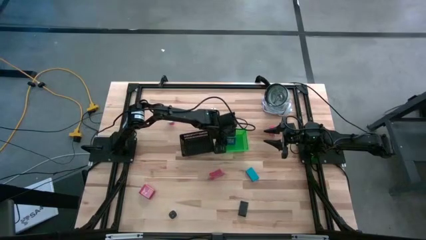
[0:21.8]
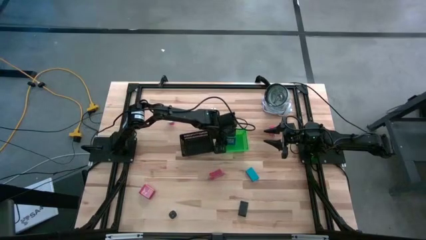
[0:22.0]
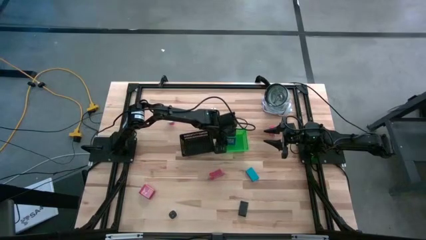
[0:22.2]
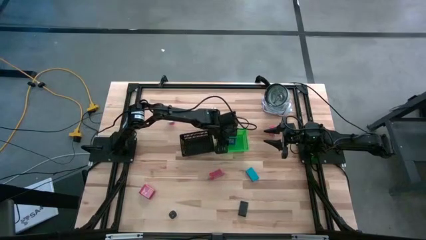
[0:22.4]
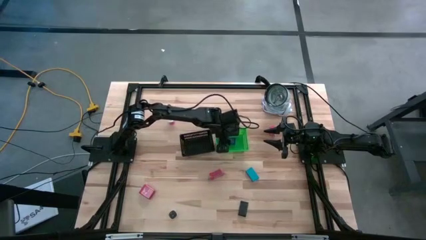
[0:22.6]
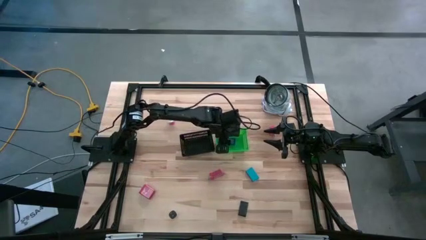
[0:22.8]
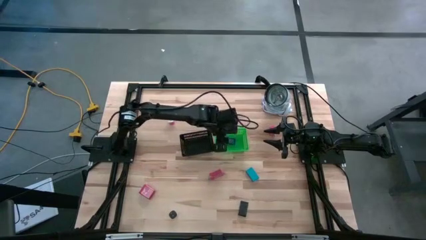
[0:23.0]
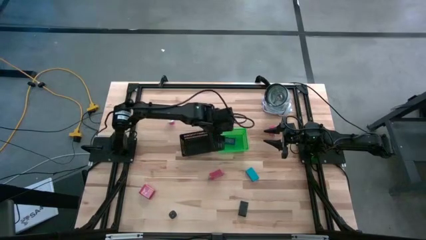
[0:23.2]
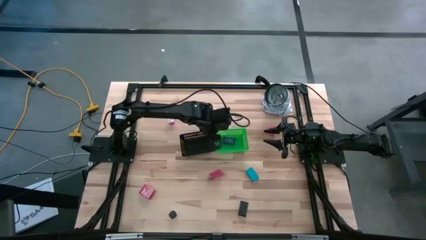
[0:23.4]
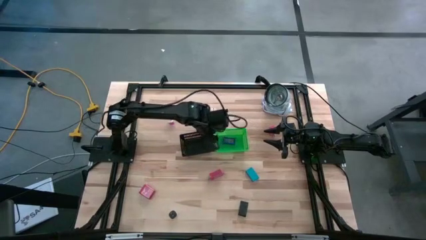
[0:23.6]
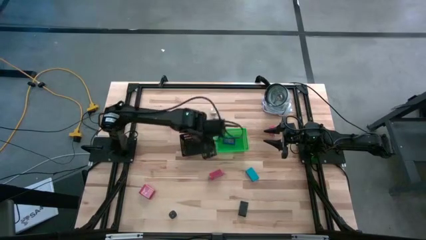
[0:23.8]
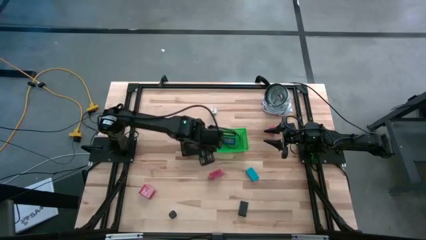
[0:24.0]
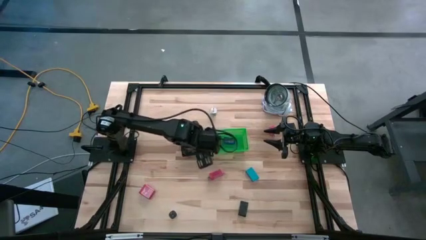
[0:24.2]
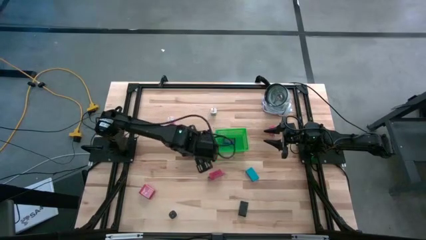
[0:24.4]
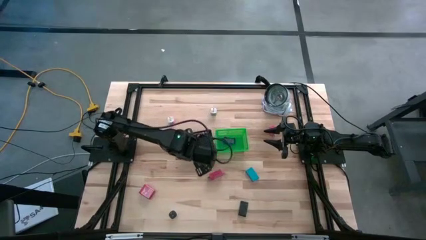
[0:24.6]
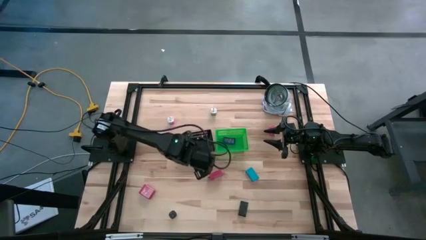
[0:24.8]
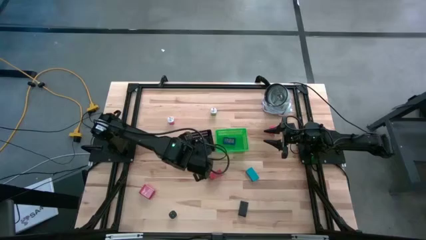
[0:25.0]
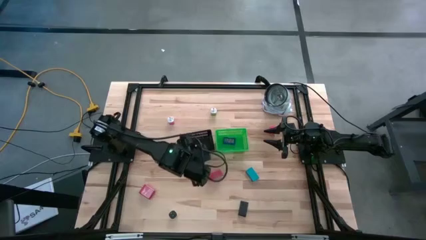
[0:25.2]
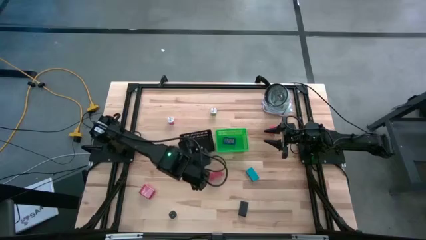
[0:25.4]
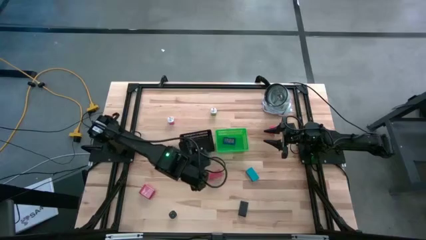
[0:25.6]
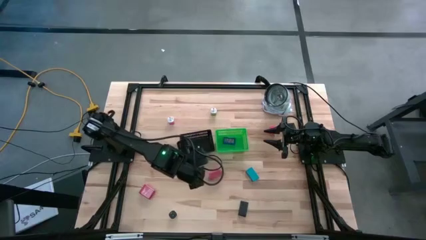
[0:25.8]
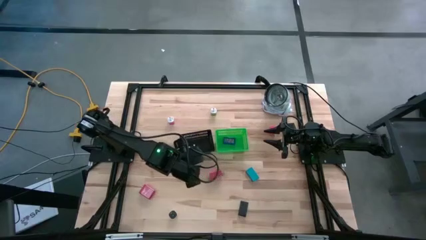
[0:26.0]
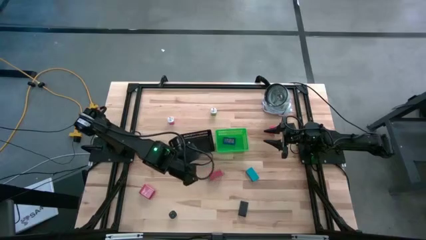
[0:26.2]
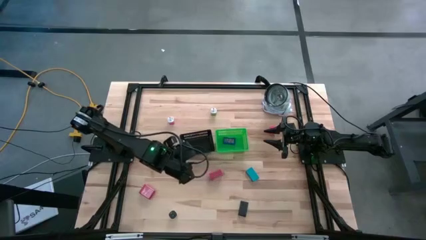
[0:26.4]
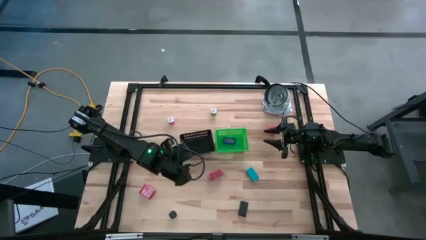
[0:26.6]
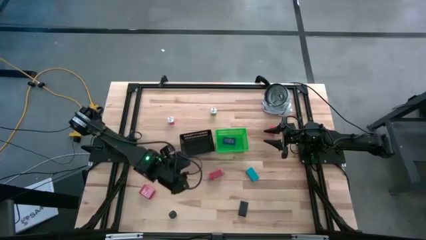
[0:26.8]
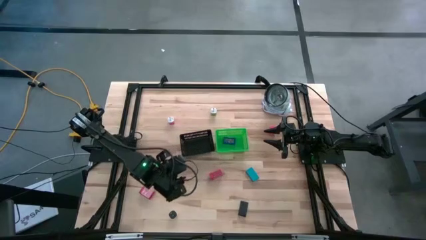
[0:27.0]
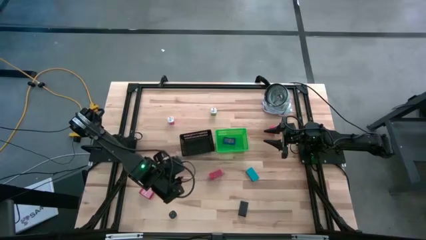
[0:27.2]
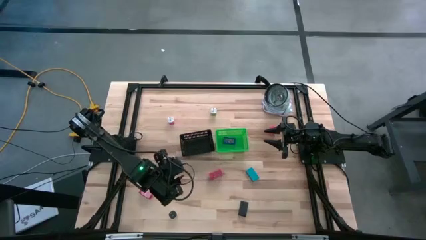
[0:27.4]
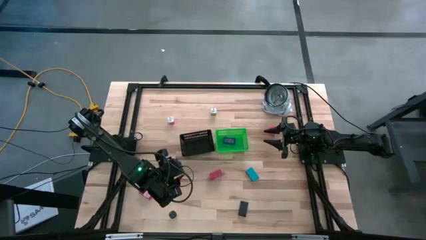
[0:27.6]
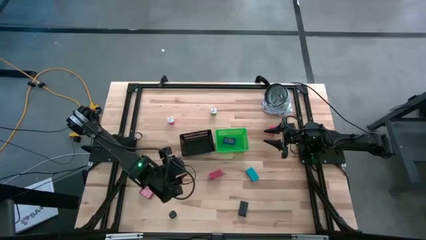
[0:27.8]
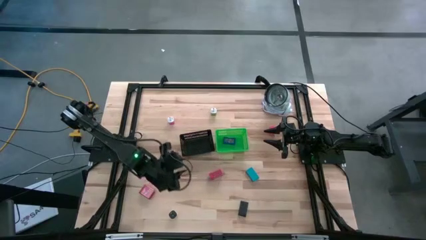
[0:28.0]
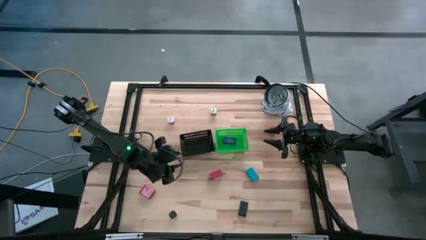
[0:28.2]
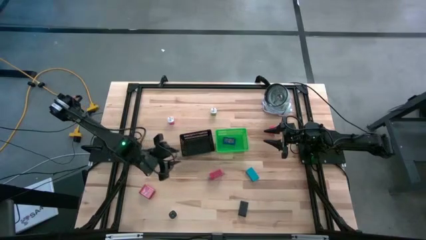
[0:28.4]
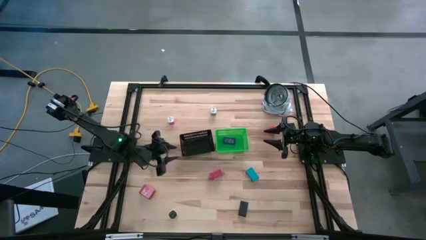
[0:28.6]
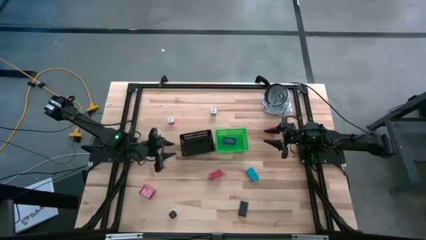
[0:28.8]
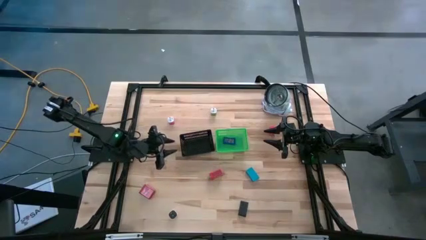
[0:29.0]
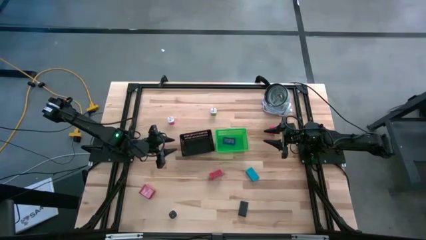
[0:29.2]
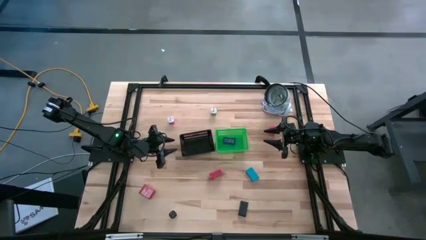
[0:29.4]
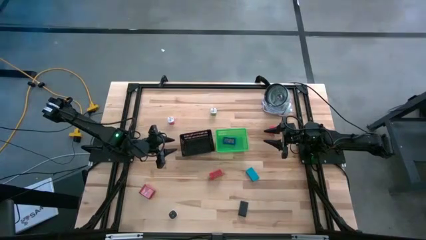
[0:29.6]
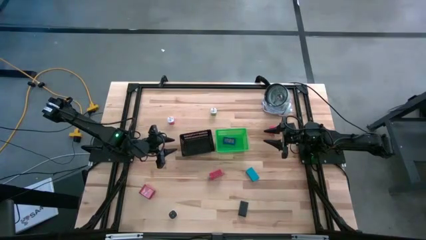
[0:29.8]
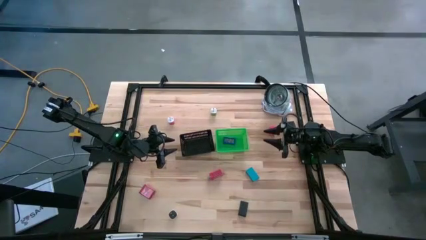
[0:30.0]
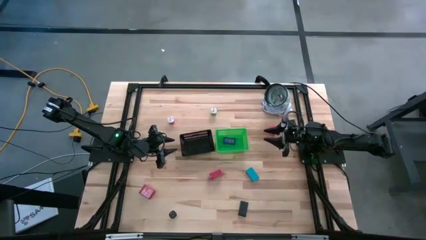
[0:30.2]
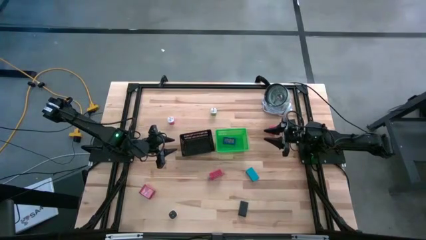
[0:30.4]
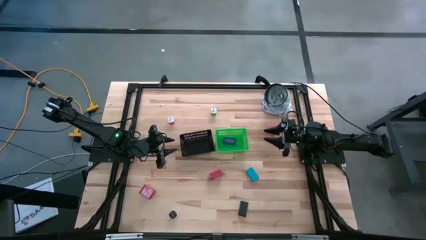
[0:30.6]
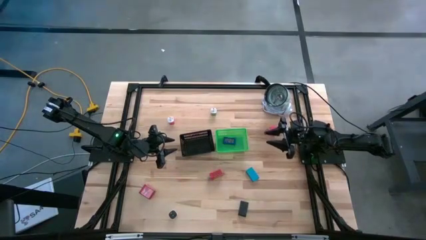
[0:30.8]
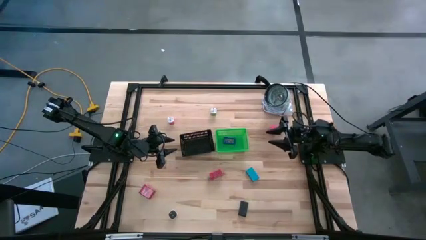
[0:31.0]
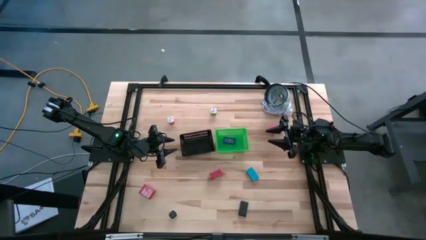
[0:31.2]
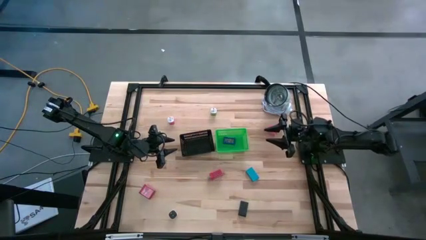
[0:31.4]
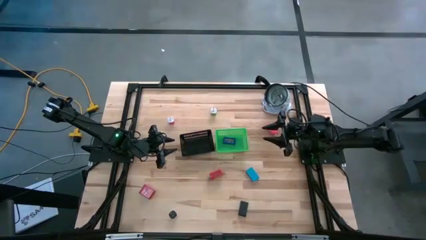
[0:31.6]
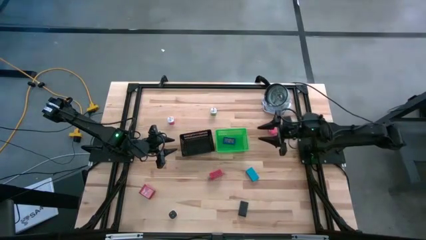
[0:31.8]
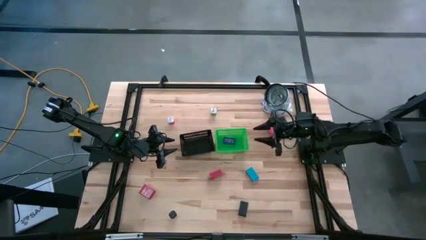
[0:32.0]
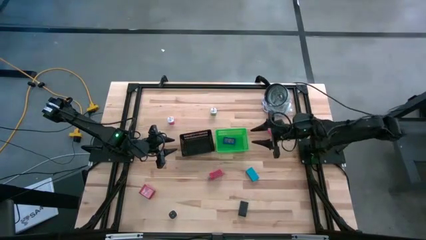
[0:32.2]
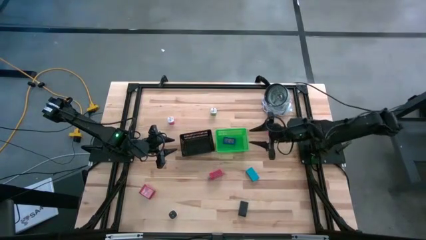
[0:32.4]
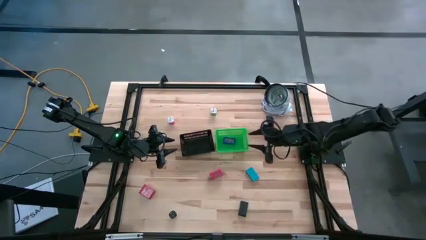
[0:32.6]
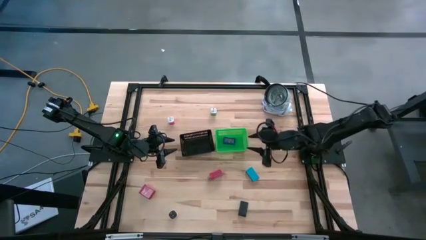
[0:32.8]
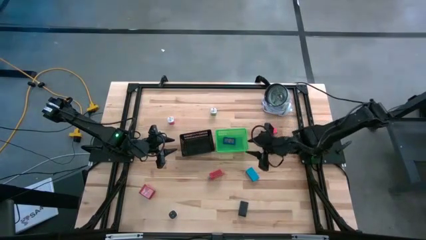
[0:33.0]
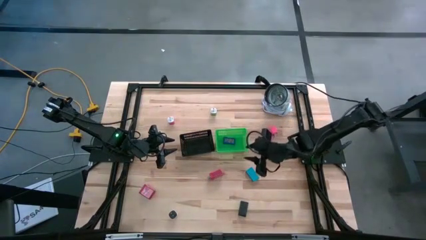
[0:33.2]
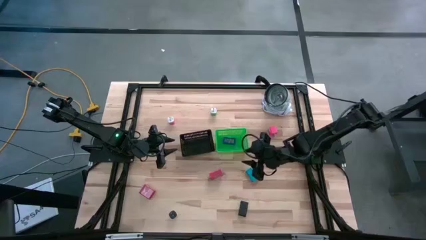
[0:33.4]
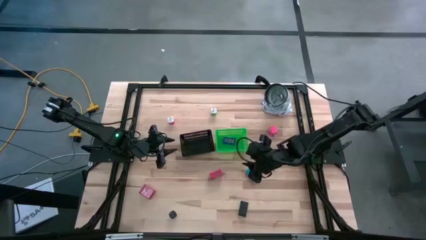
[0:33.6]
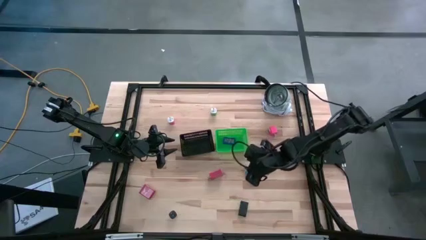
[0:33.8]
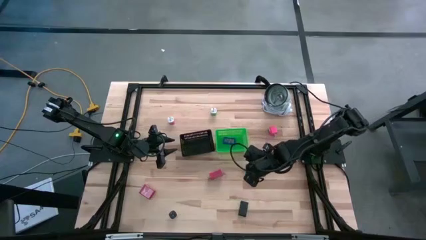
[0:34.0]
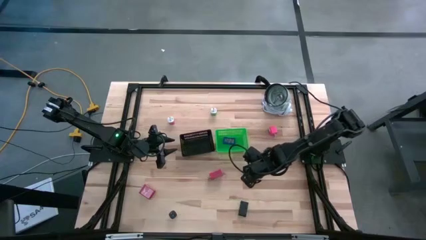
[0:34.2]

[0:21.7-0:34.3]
Task: Pick & Place Office items
Put the light blue digital timer into the green bin

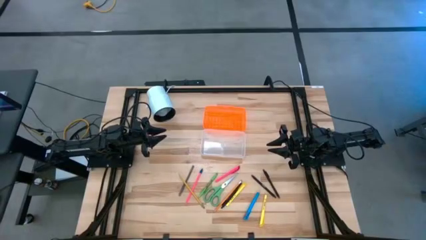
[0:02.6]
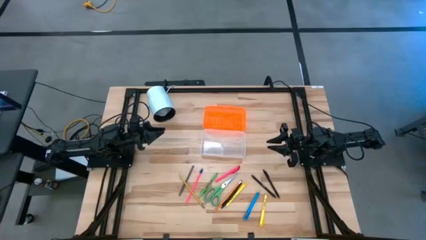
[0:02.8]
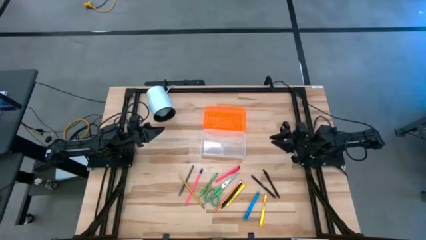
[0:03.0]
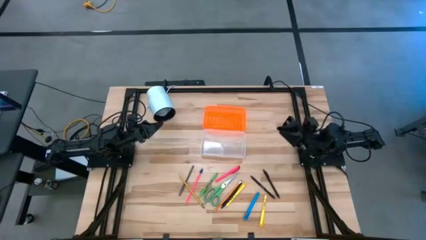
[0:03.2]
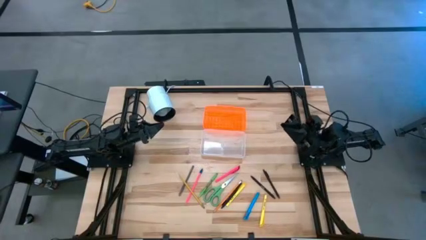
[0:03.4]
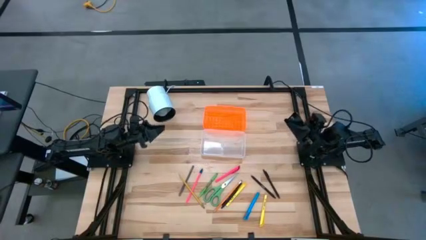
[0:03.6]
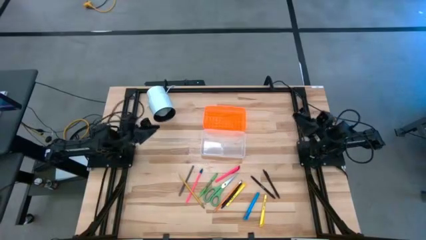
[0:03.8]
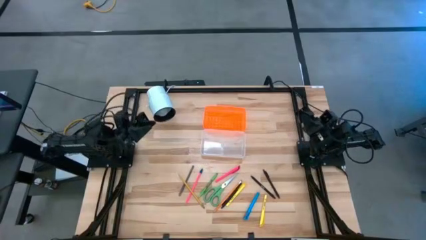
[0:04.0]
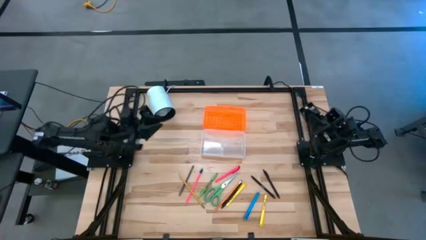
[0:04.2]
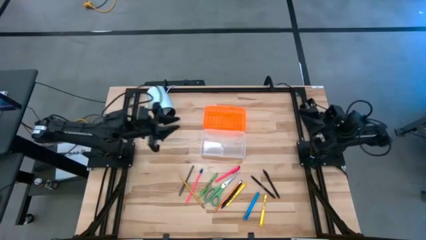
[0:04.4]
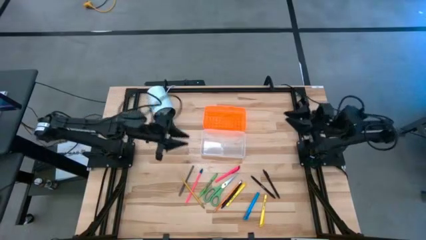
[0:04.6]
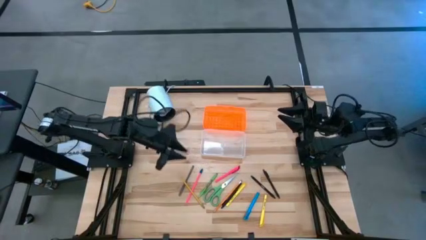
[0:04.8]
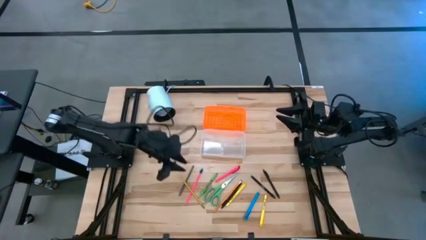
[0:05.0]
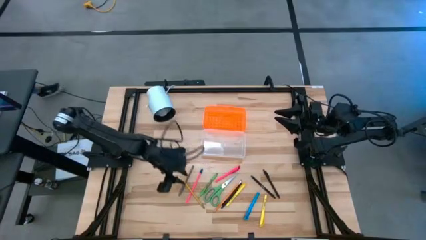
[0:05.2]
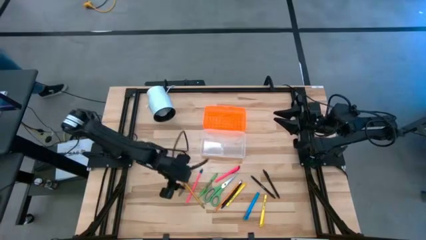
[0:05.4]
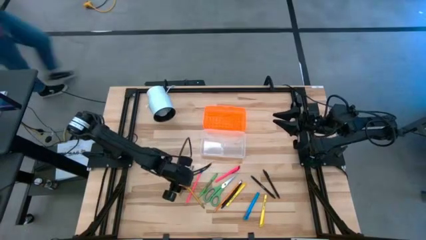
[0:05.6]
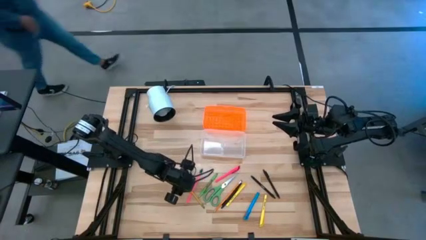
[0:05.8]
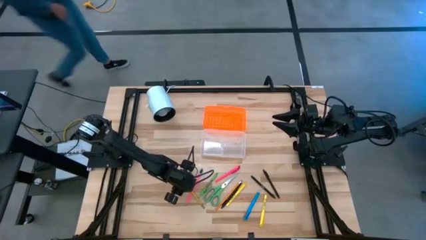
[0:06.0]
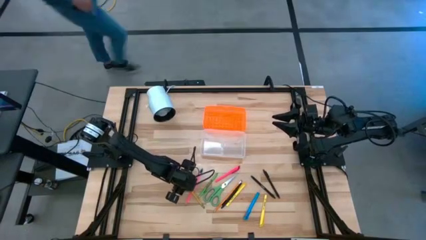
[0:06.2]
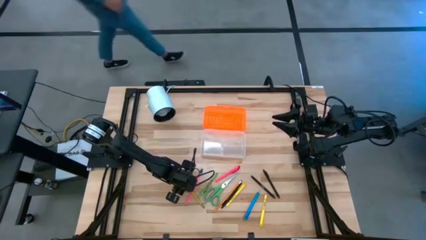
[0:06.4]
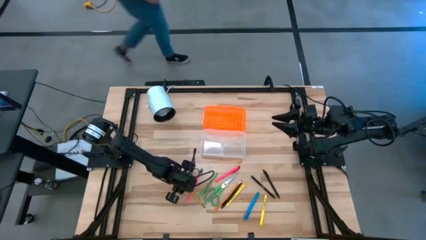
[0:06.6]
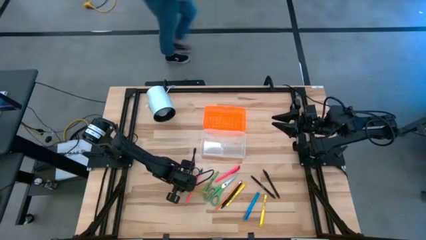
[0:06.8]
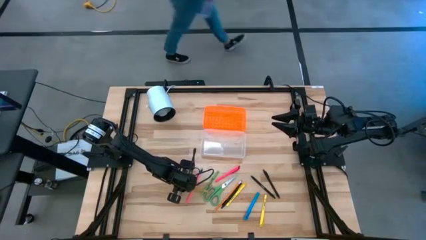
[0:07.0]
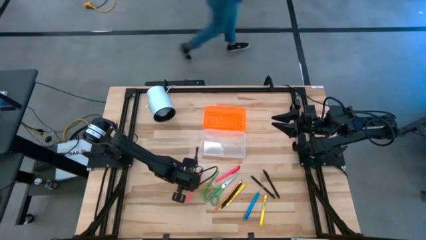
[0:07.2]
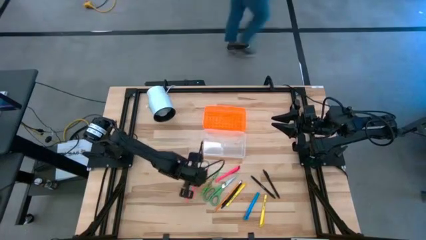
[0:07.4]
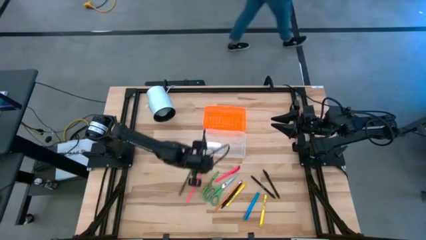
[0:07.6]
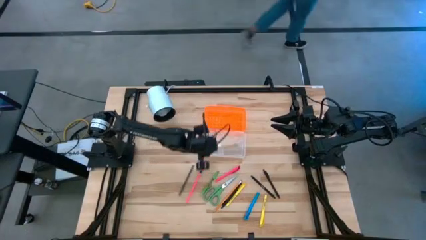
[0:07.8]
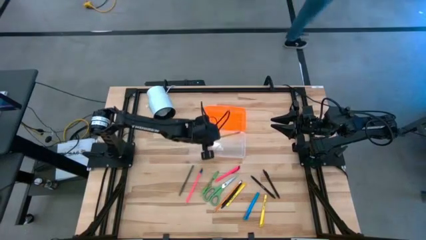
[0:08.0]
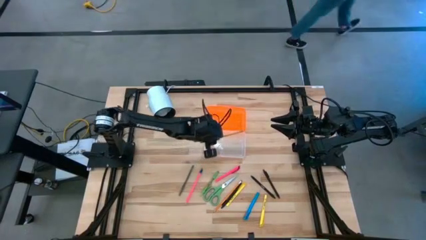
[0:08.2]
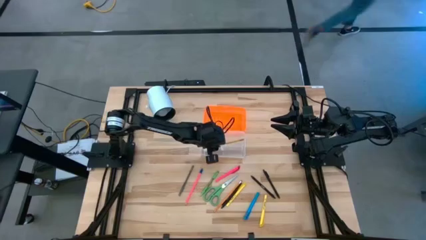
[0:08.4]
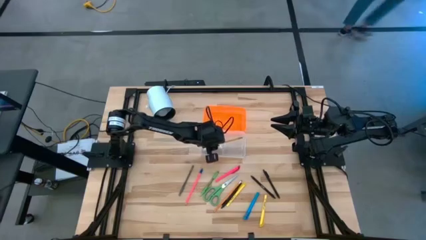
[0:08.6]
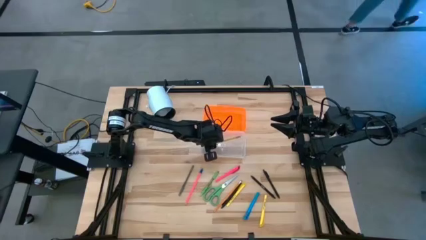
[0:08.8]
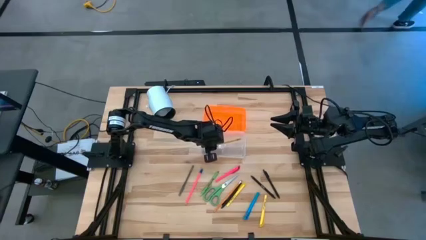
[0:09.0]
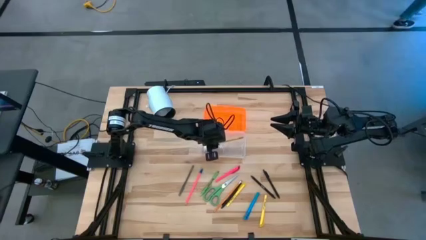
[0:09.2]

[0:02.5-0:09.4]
Task: Pick & place school supplies into a supply box
Put the yellow pencil into the orange supply box
